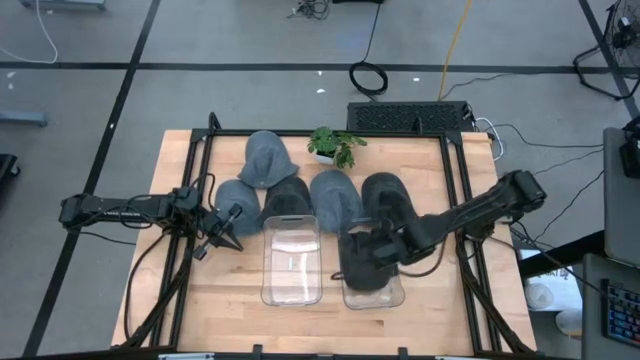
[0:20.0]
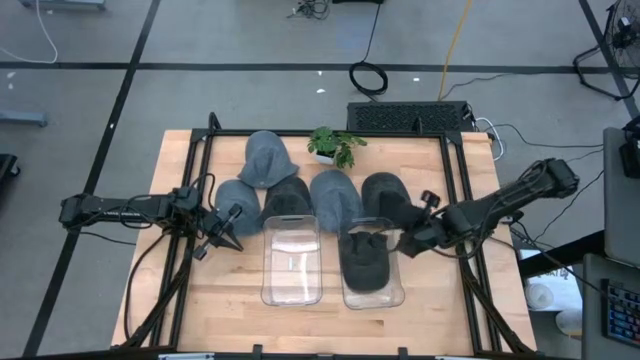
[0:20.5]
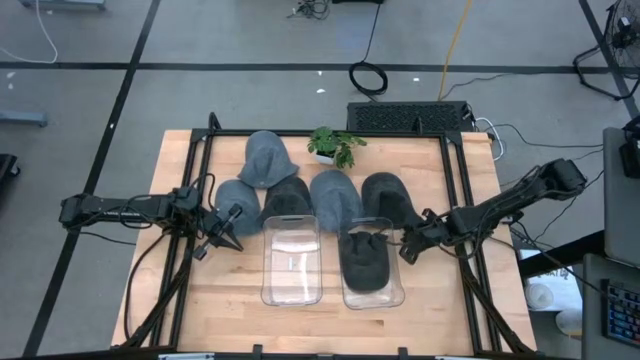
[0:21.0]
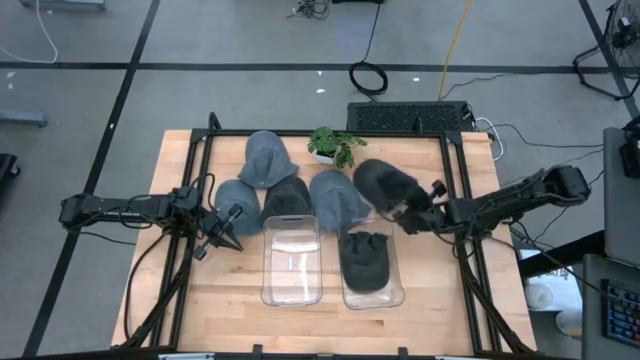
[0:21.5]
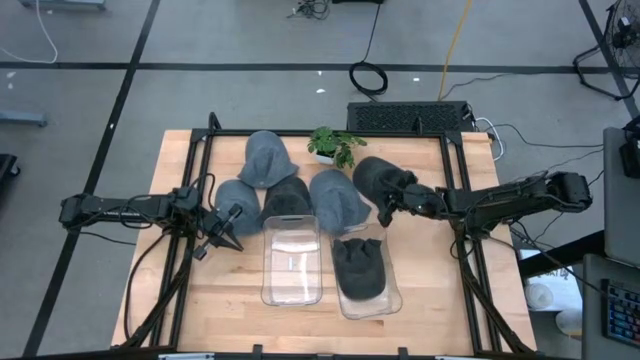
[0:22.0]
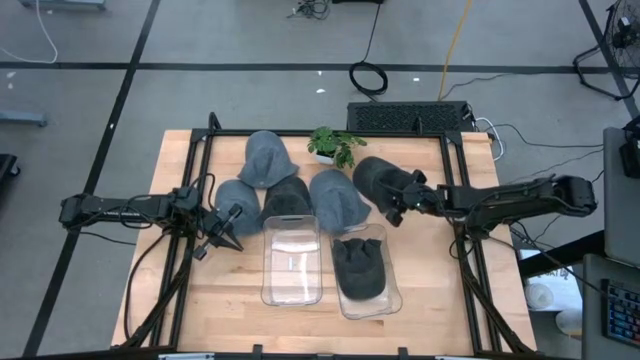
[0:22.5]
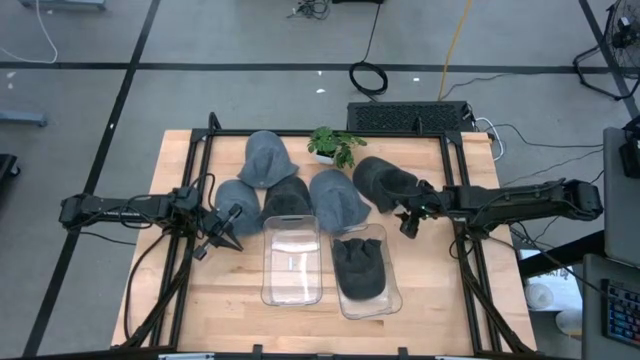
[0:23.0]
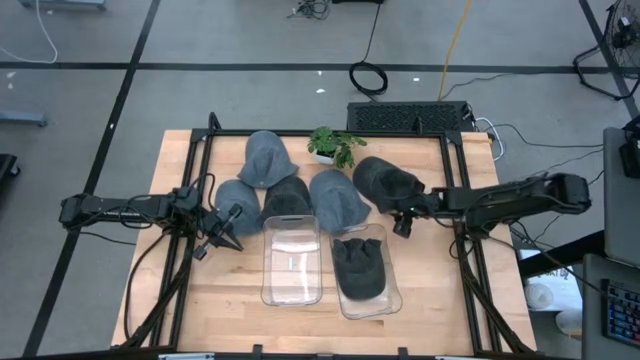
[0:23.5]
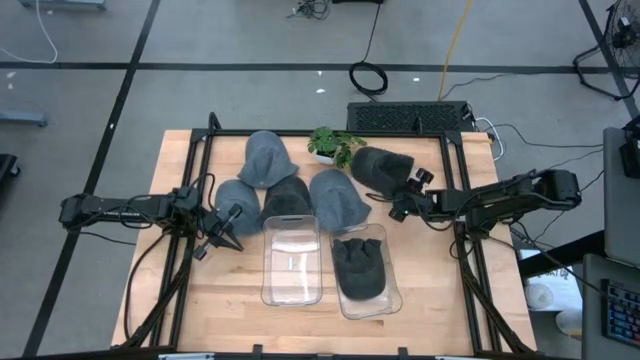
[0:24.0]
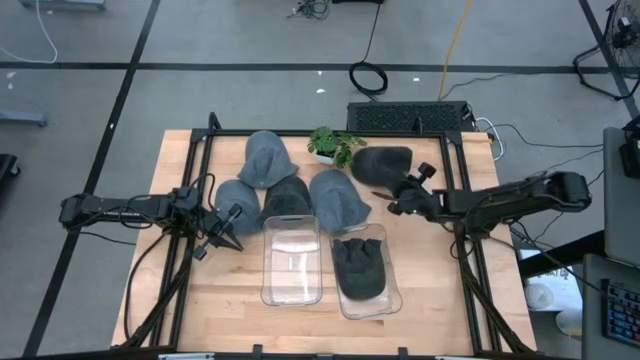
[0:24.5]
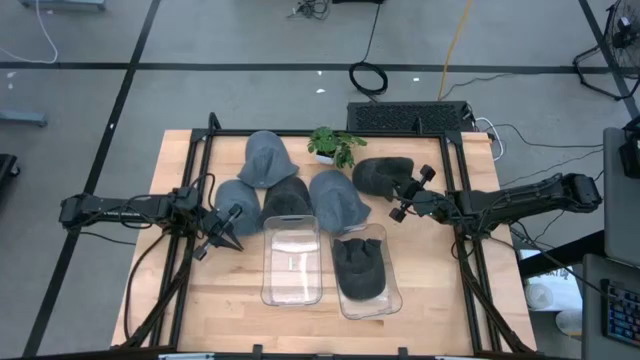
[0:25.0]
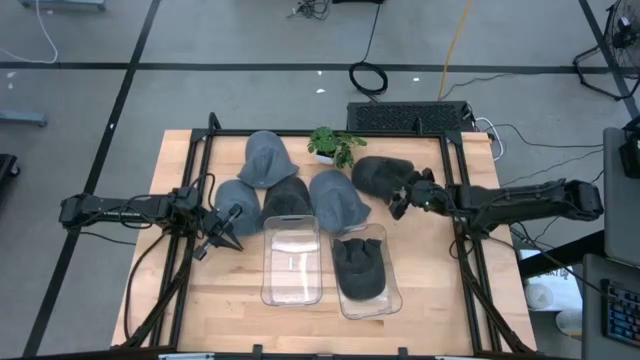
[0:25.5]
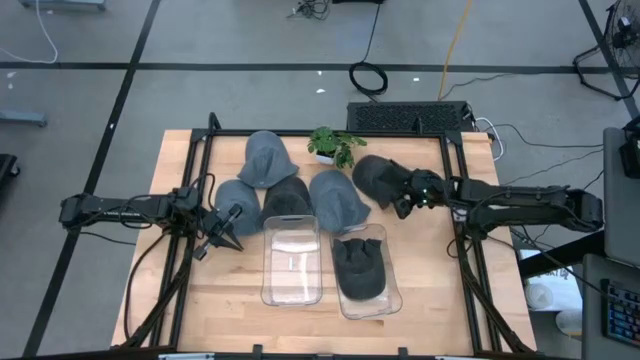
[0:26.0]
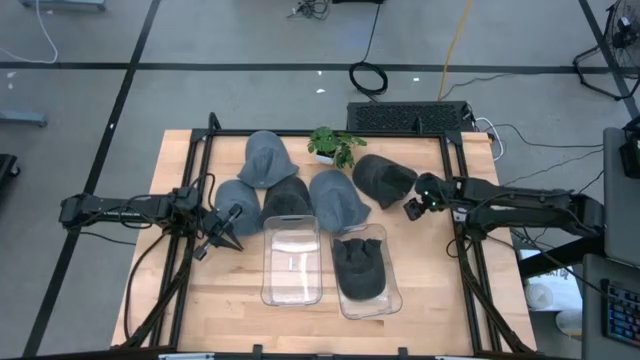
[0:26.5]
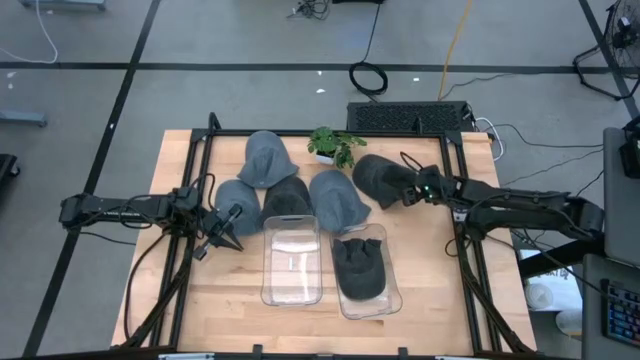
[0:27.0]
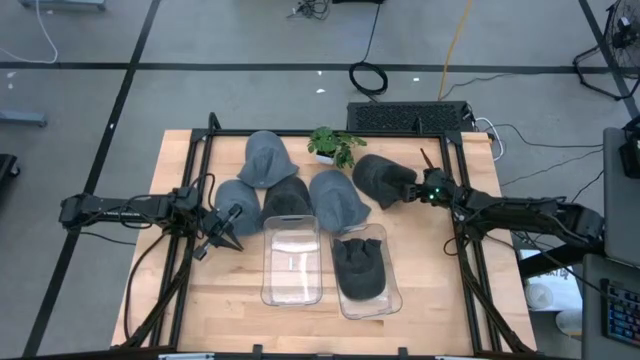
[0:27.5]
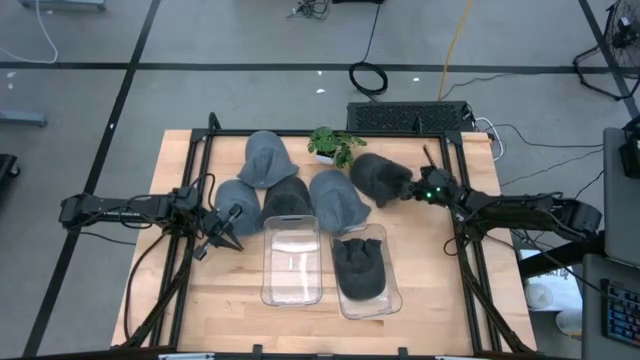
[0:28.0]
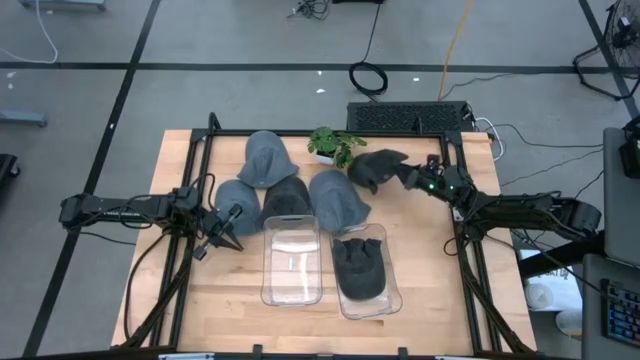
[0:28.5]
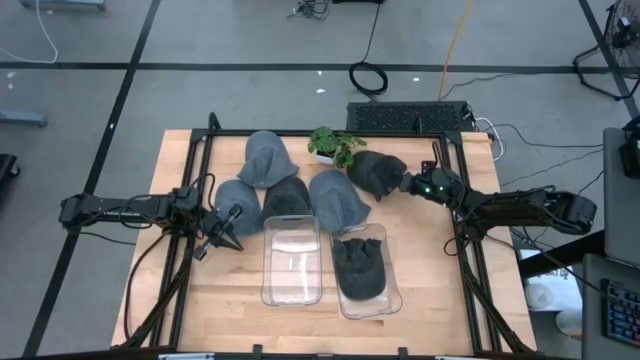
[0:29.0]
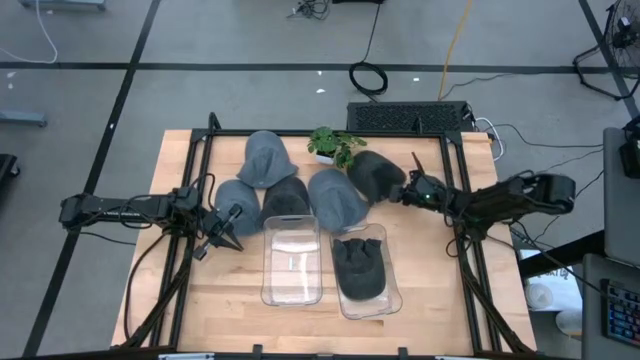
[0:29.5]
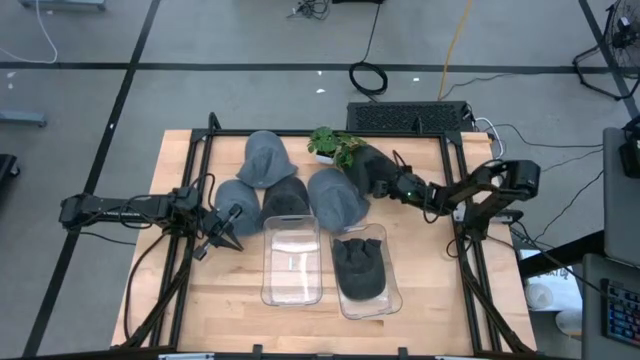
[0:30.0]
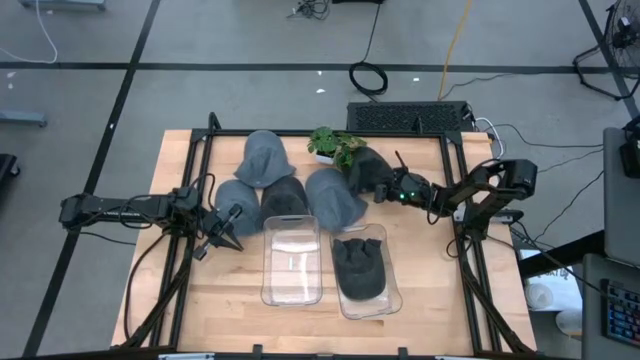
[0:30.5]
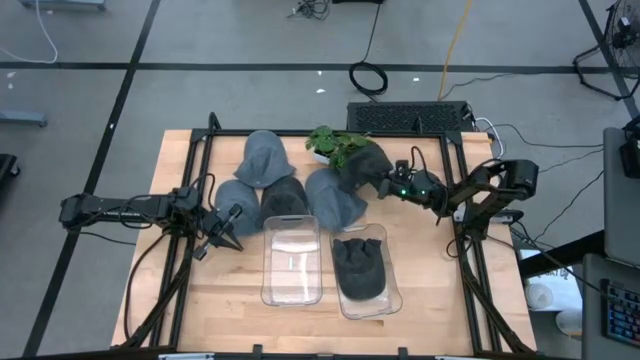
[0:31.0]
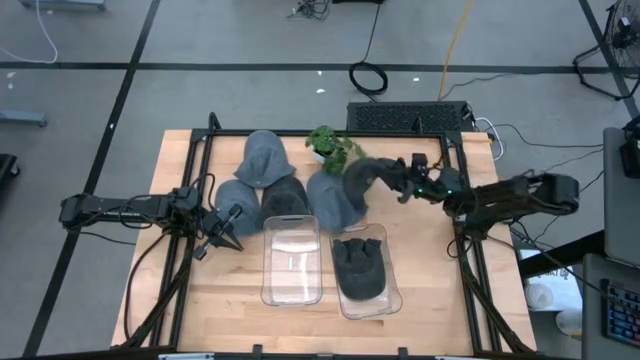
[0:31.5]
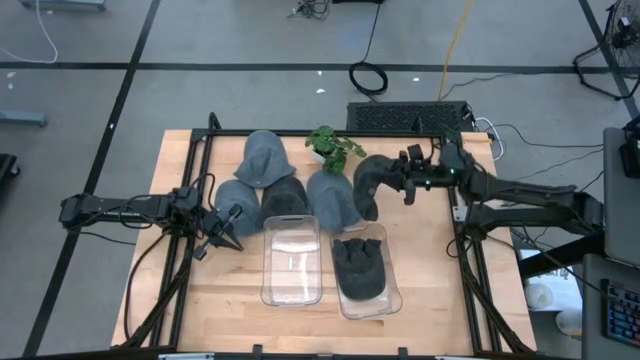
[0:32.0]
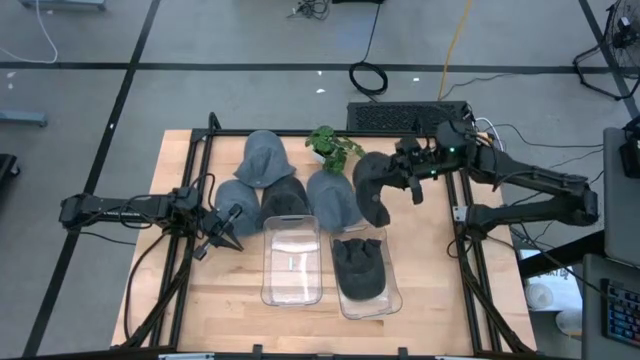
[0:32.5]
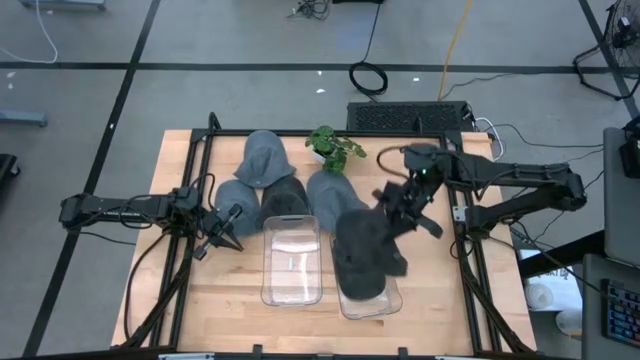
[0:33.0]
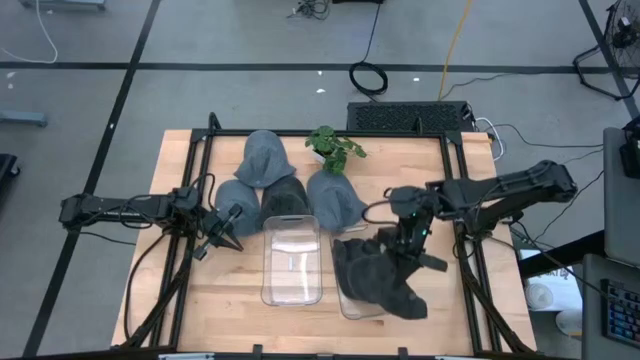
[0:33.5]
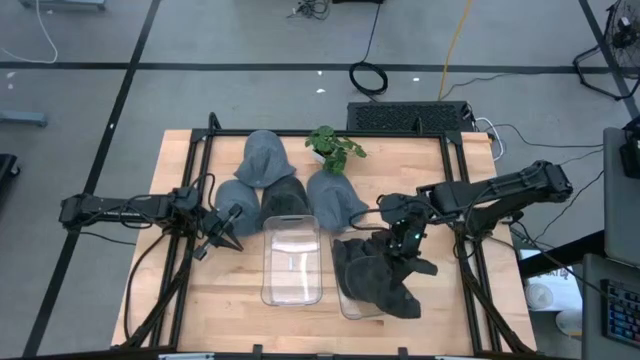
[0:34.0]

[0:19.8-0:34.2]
Task: Pick & Place hat
Put the right black cap into the right transparent bin

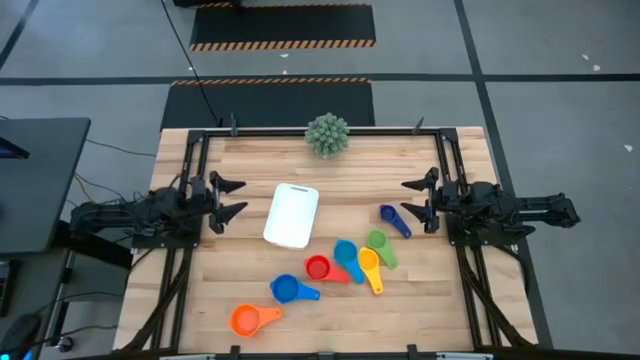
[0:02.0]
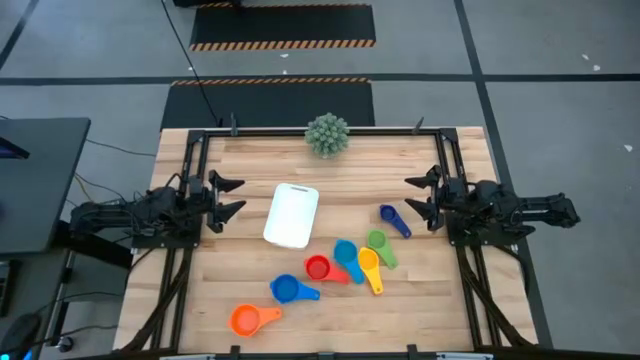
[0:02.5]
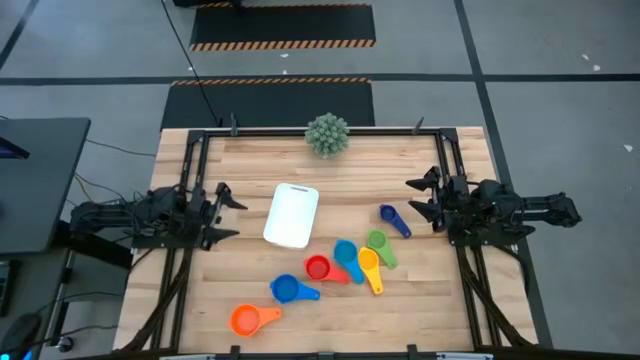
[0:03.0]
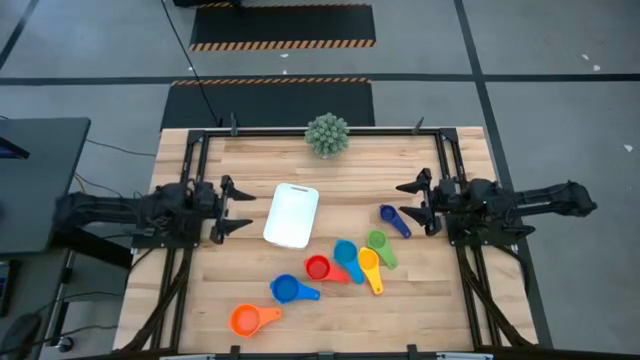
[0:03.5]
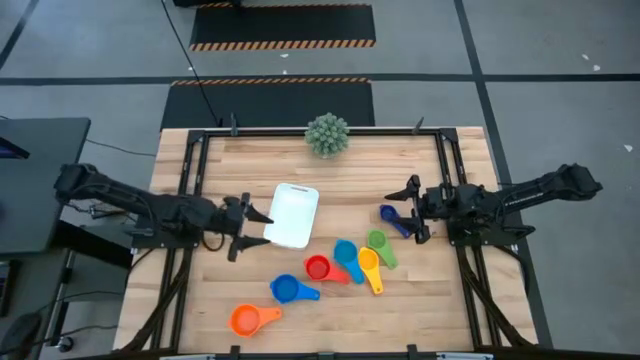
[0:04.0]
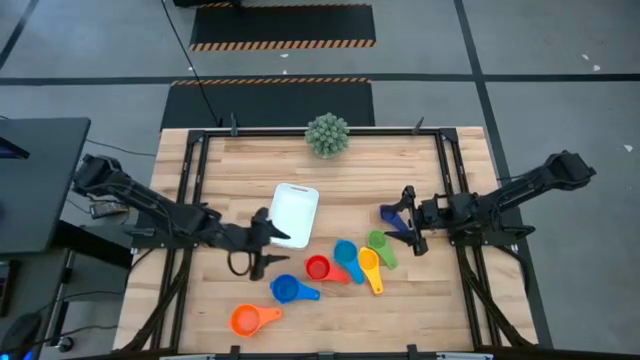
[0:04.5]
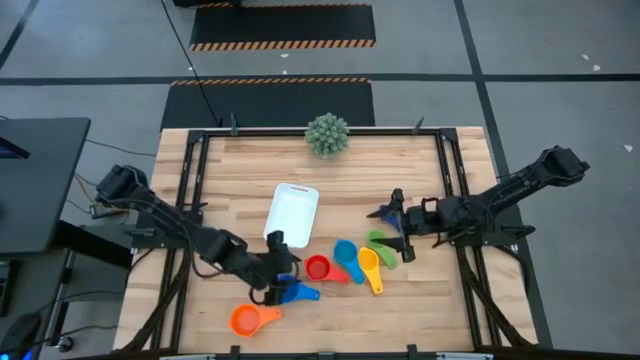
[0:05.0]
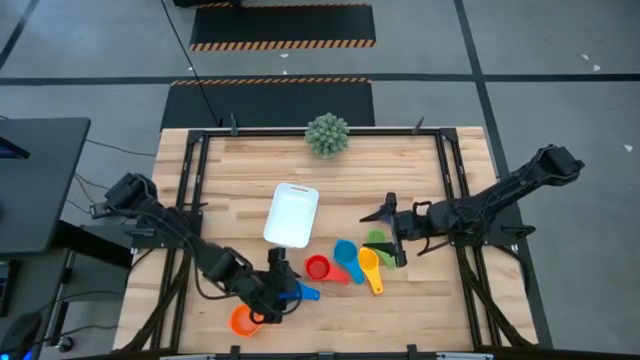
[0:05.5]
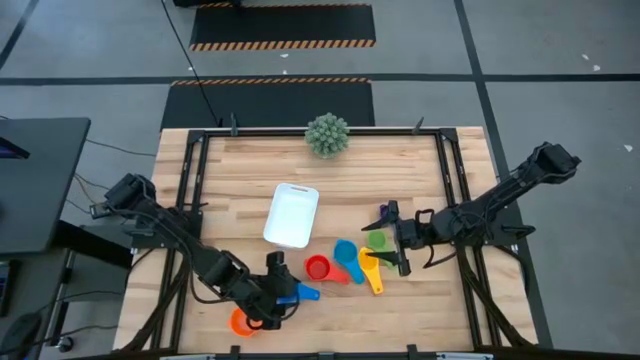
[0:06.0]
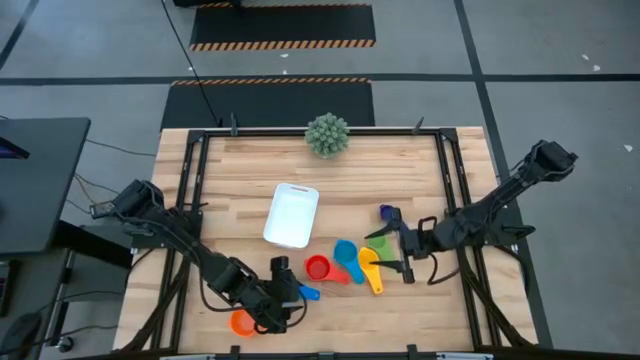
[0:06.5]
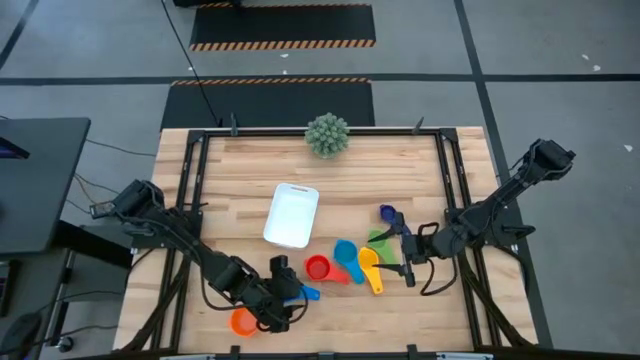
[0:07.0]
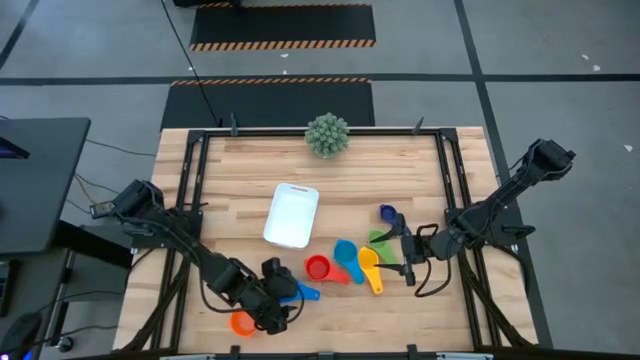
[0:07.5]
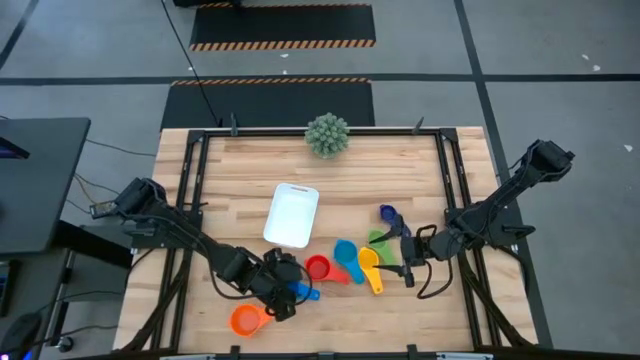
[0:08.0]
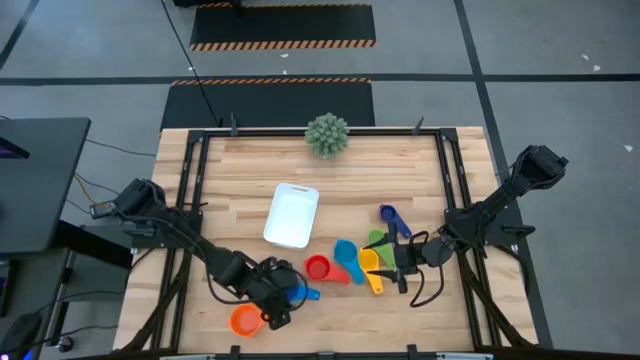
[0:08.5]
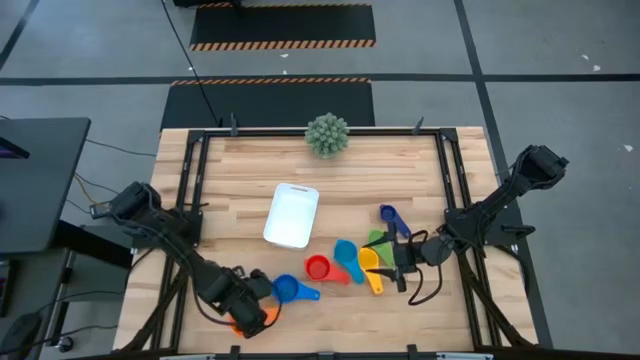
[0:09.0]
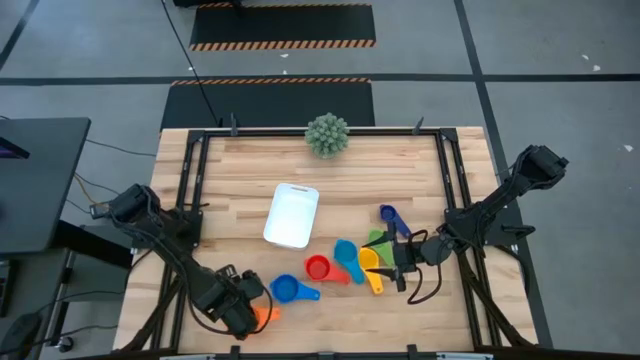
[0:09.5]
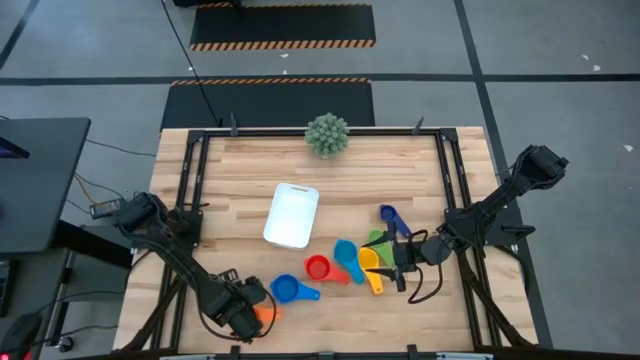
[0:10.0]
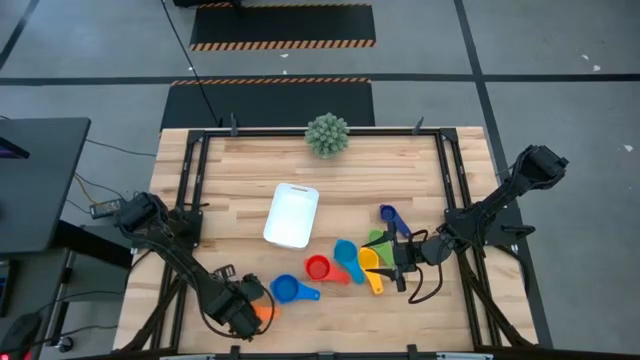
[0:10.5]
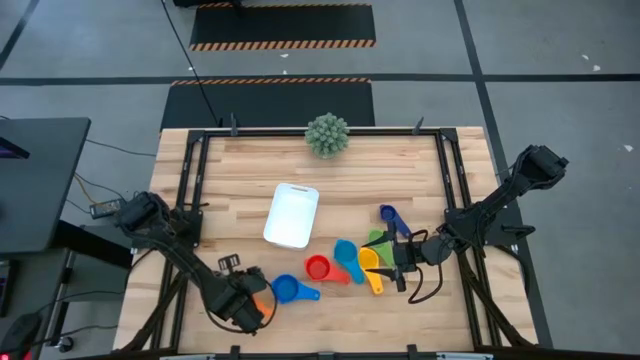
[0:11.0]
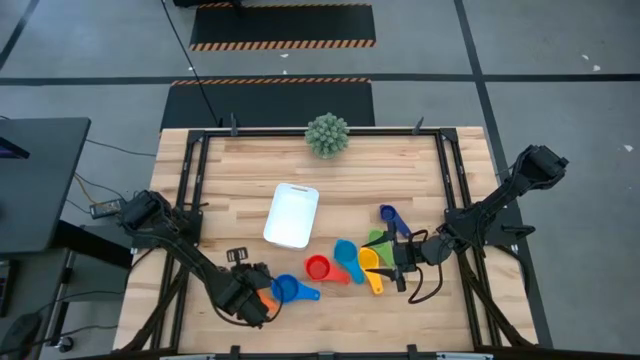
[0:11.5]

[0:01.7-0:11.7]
Task: Nest measuring cups in basket
Prepare the orange measuring cup
